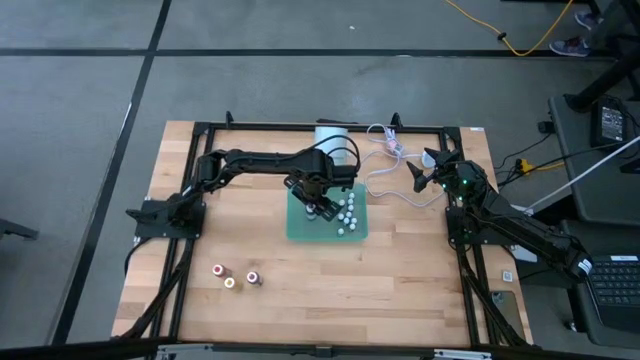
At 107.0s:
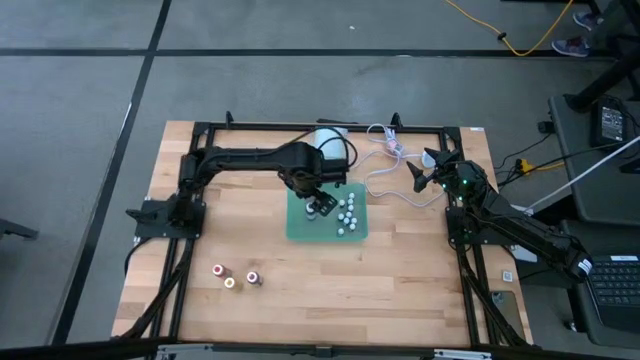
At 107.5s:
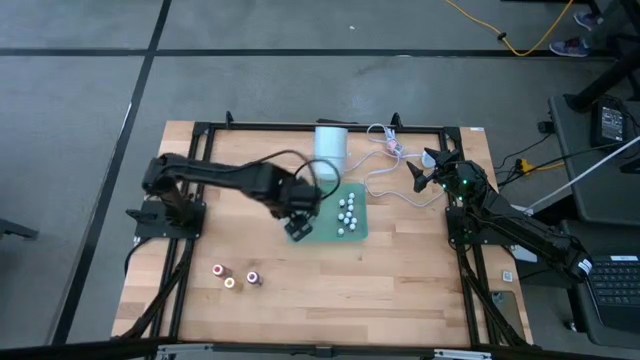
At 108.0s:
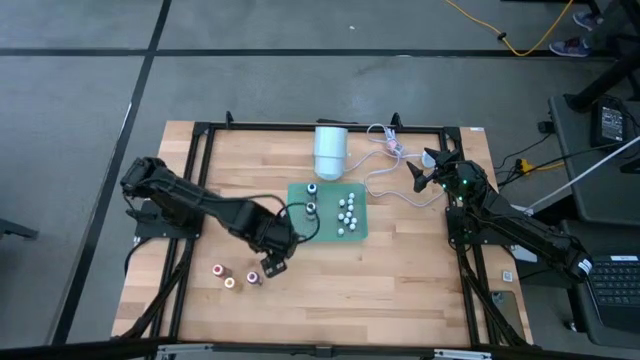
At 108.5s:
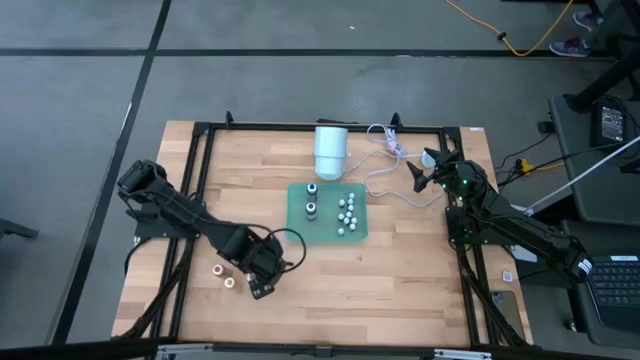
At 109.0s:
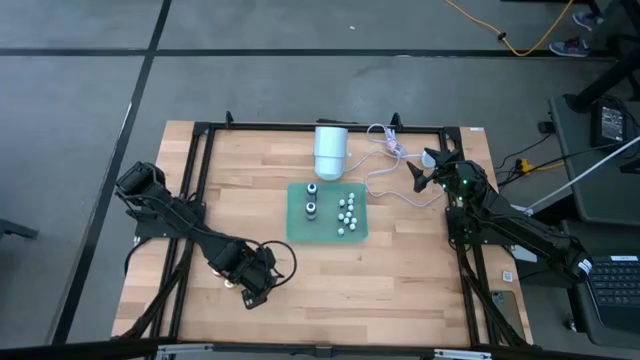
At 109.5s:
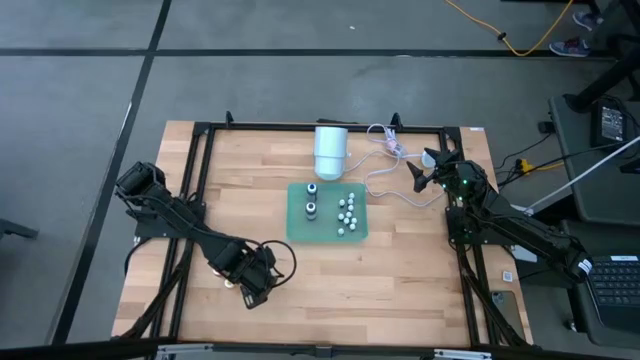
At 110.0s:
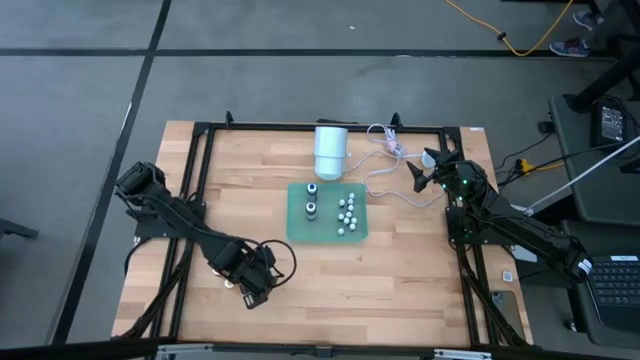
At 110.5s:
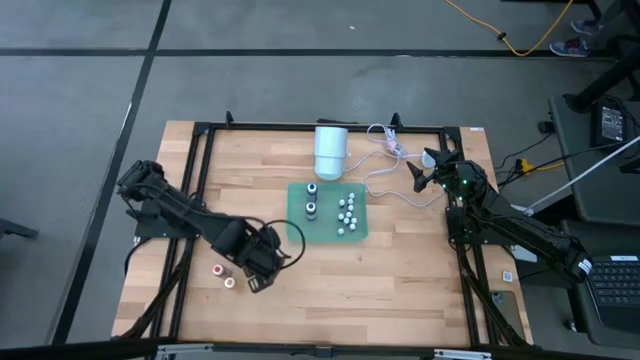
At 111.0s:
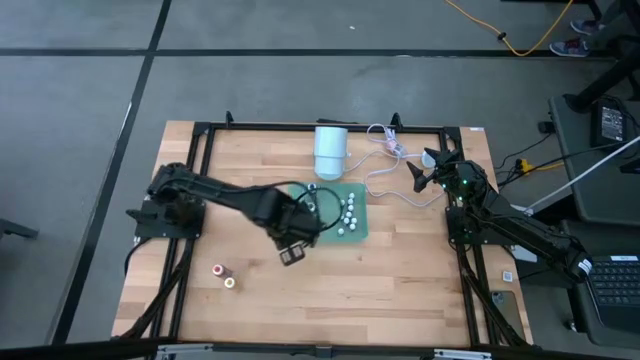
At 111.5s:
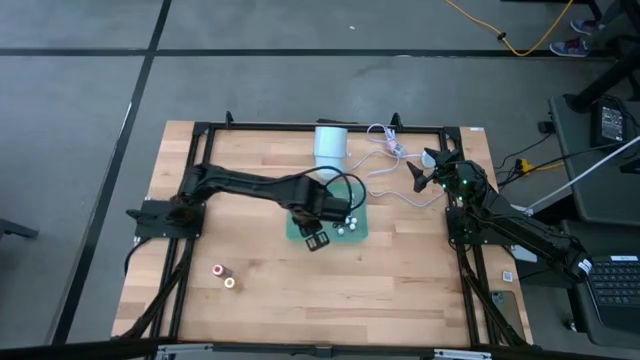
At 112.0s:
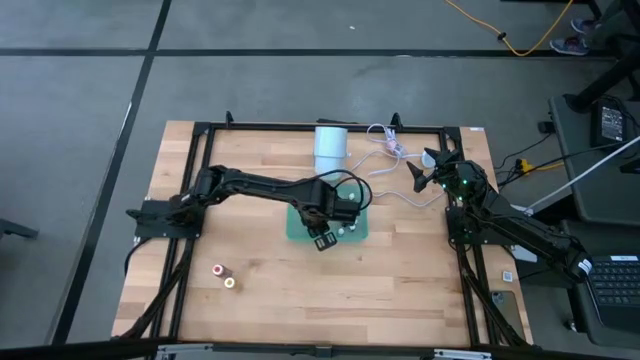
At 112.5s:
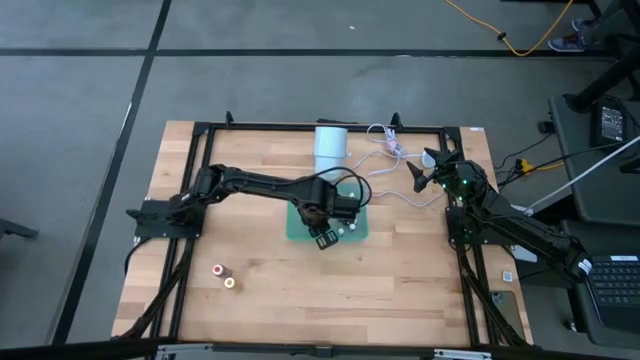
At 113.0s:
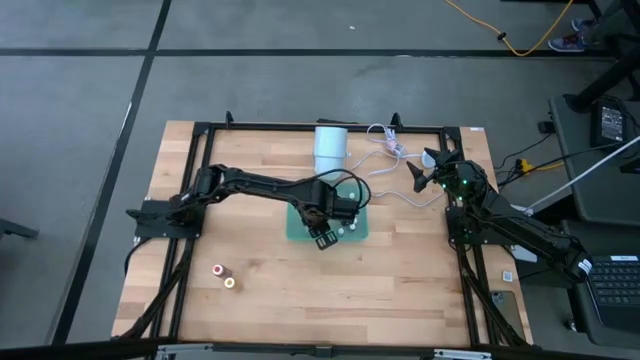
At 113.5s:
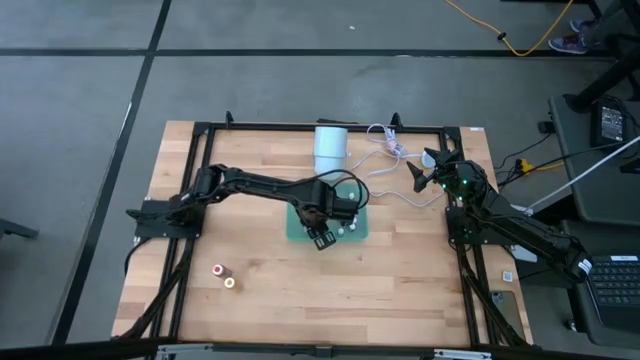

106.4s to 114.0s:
Task: Pick & Place food coloring
Put the large pink food coloring bottle into the green bin

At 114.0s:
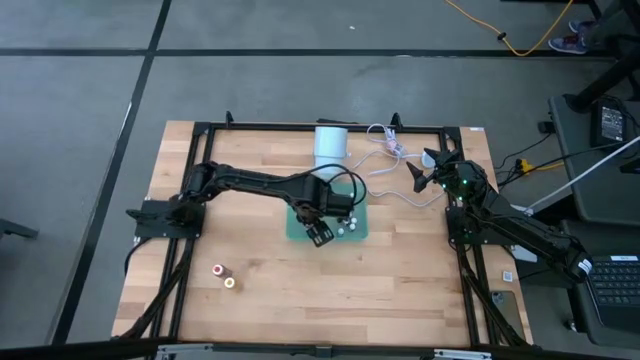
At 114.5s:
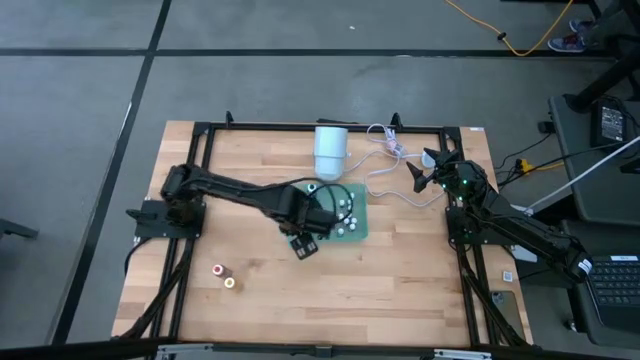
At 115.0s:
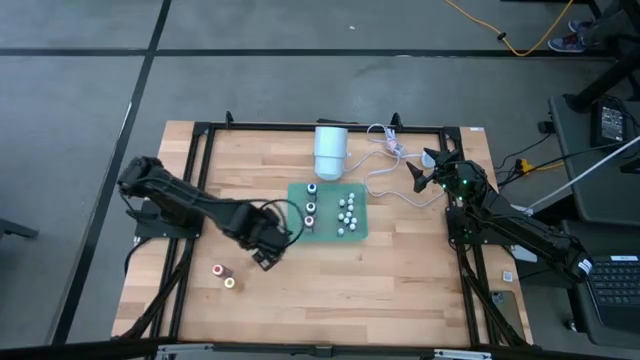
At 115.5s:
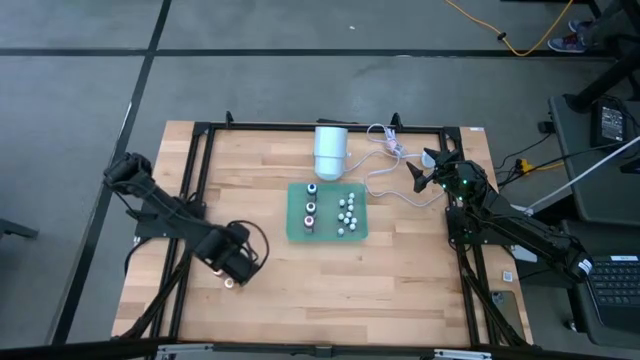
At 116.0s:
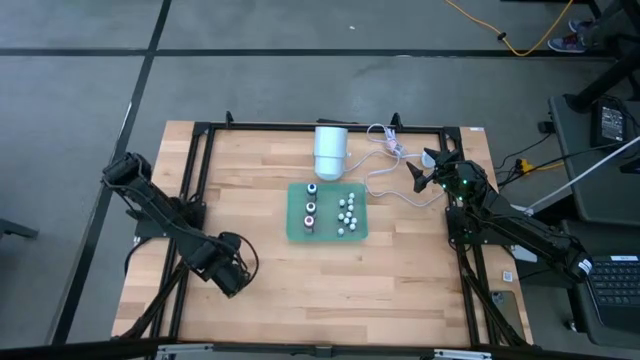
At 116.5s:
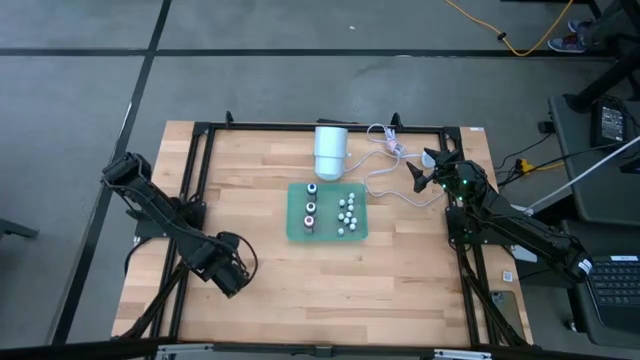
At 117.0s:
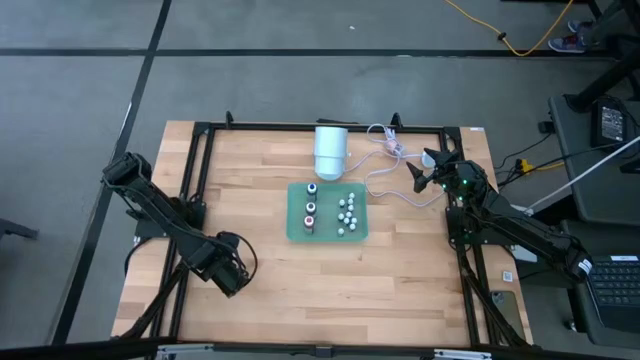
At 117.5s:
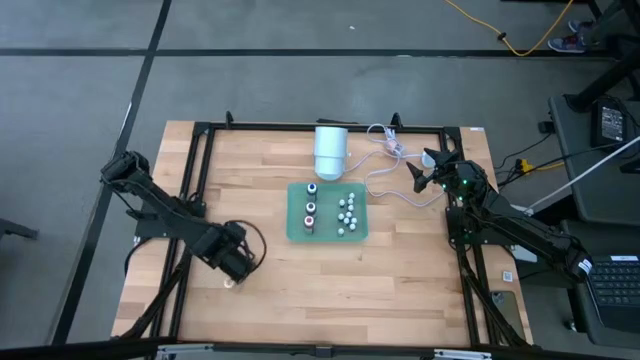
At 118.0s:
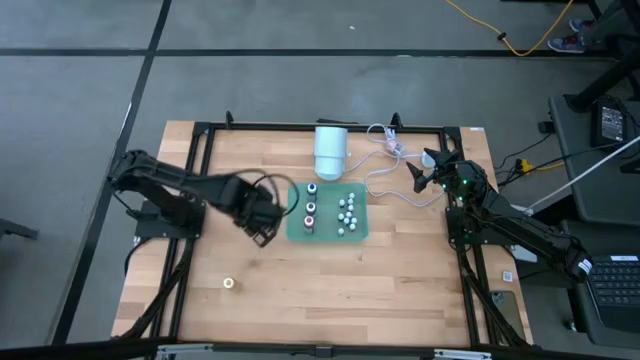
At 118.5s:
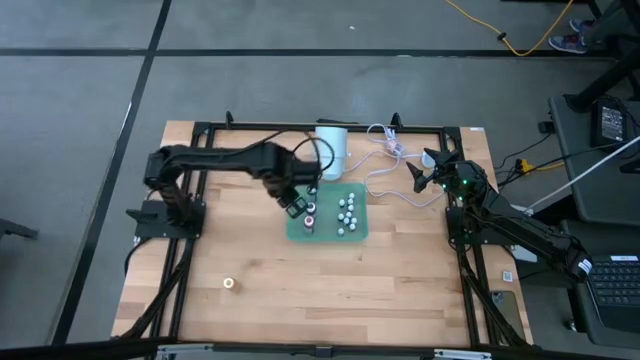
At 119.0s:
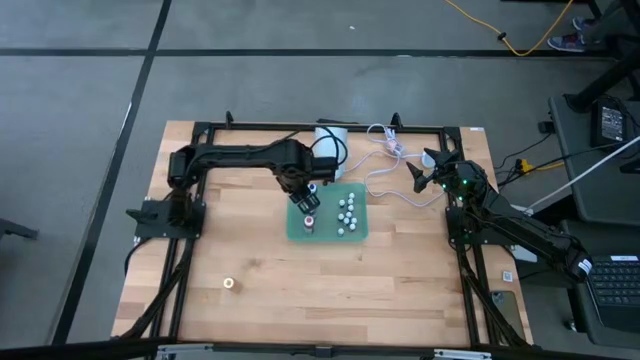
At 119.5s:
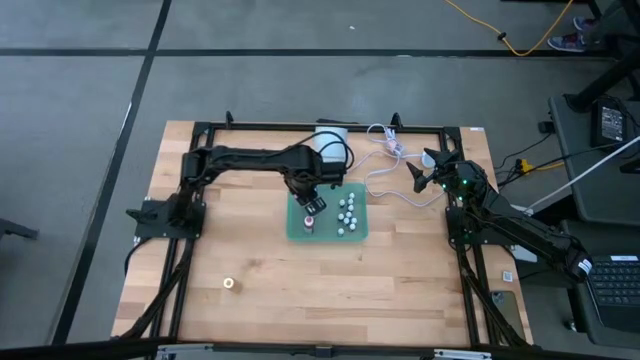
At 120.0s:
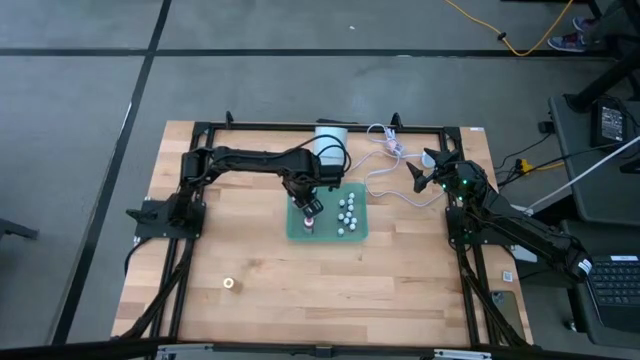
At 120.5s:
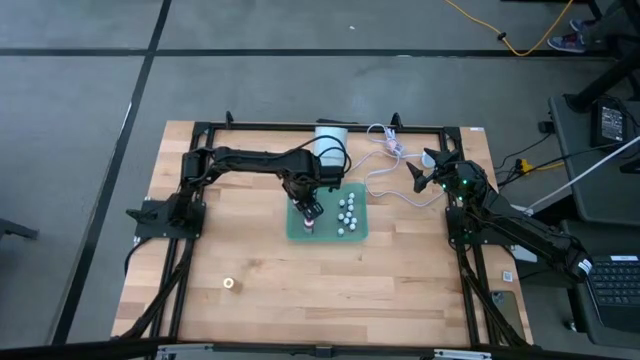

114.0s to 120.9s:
Put the large orange food coloring bottle into the green bin

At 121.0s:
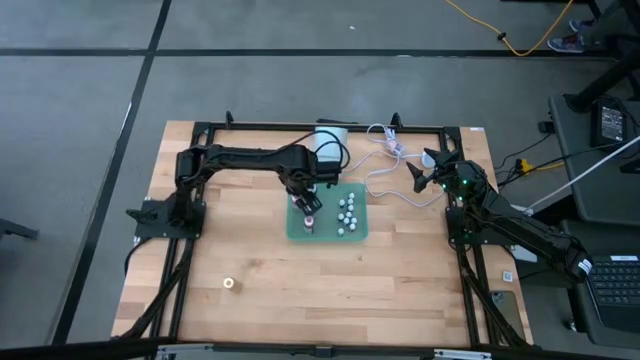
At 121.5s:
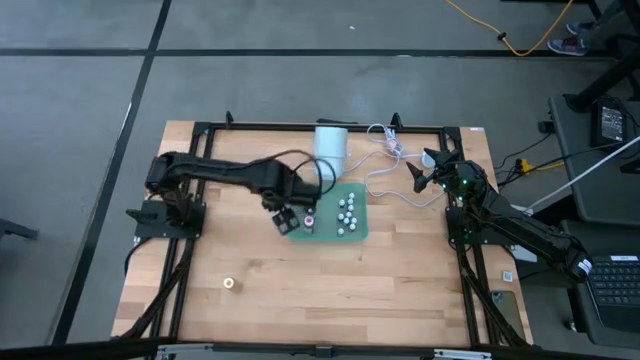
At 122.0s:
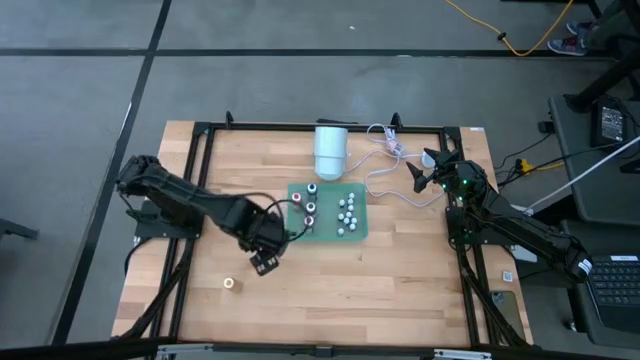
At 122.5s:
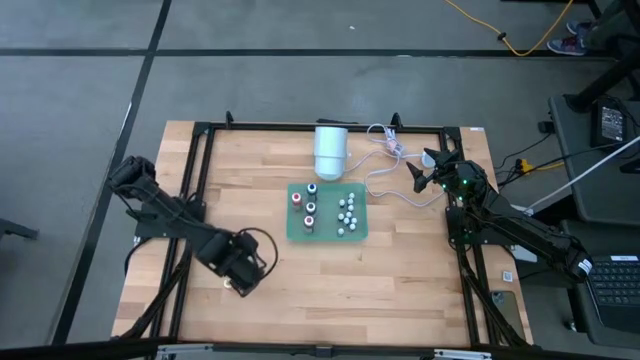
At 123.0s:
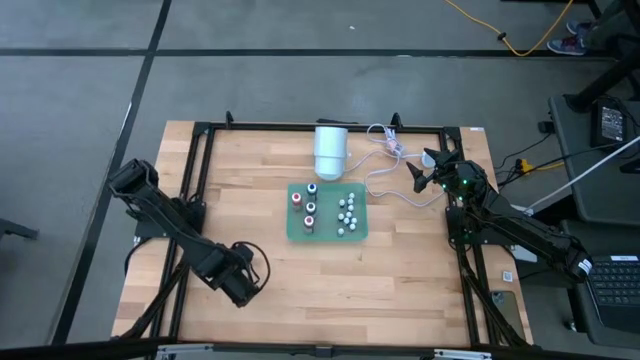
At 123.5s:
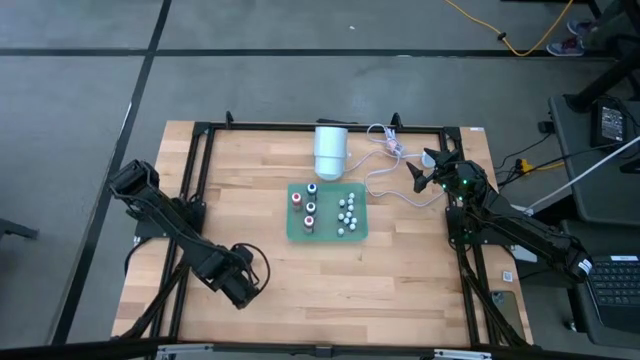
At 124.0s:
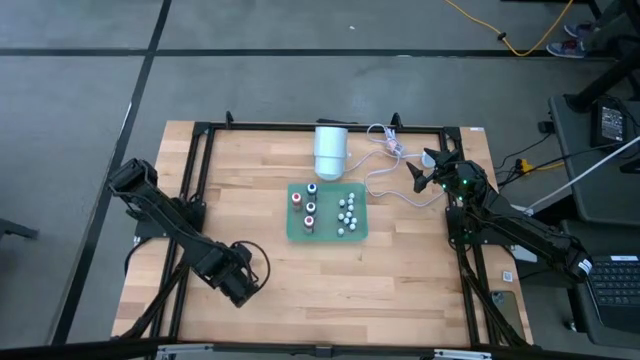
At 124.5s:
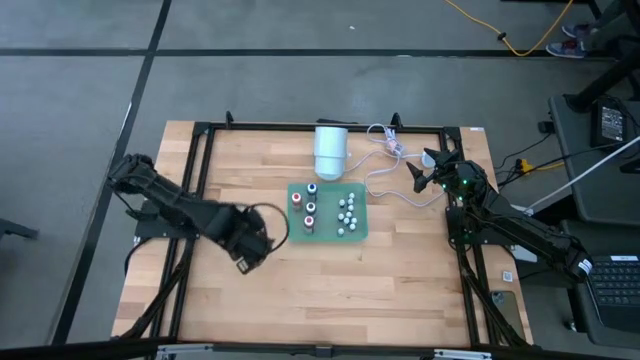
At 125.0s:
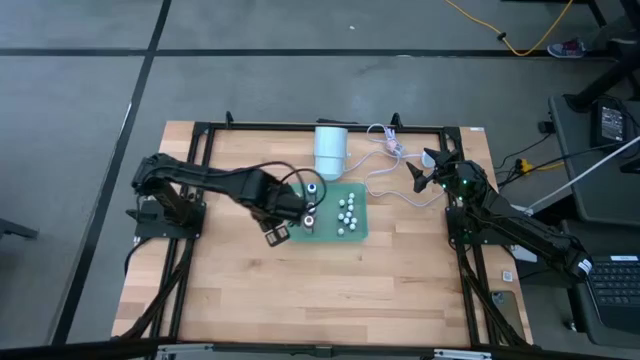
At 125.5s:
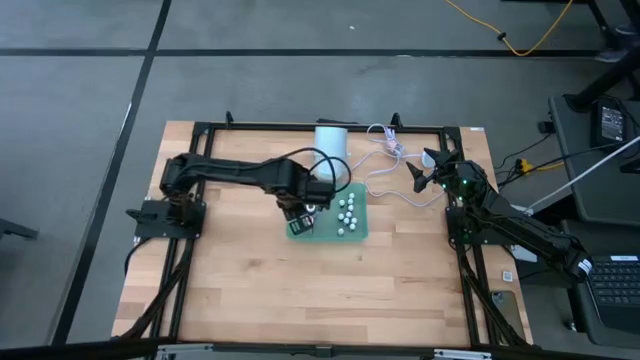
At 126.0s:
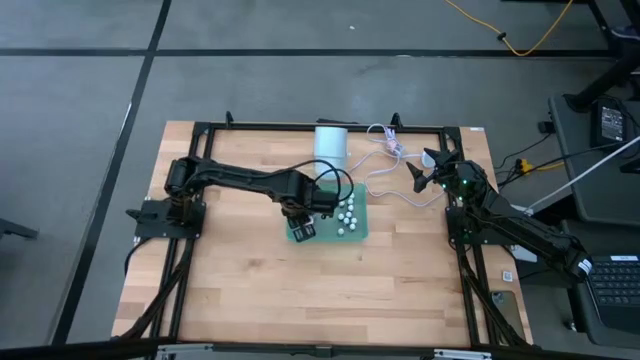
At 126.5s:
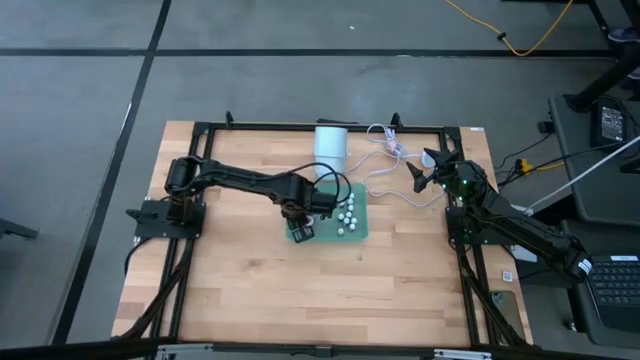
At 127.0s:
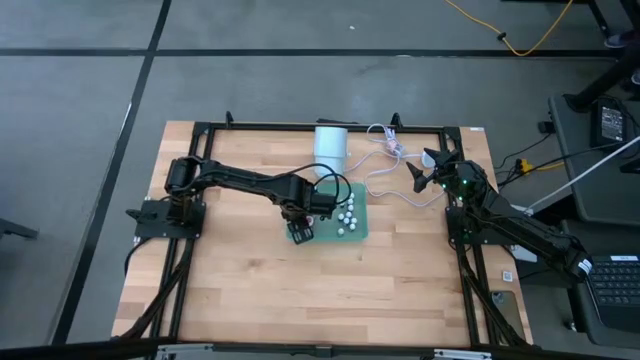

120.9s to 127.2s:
Put the large yellow food coloring bottle into the green bin

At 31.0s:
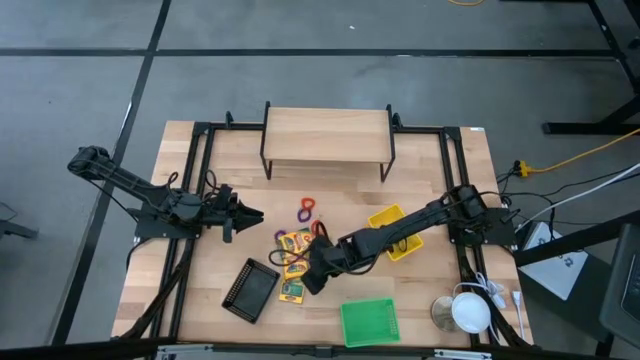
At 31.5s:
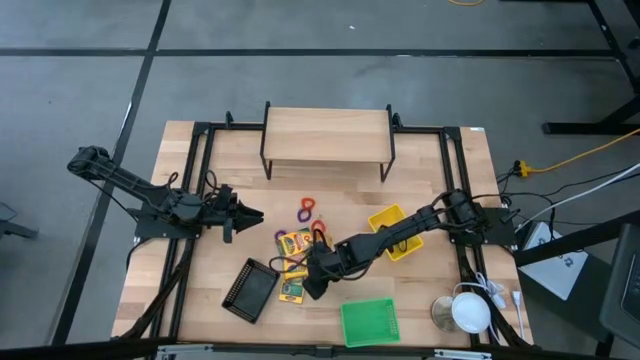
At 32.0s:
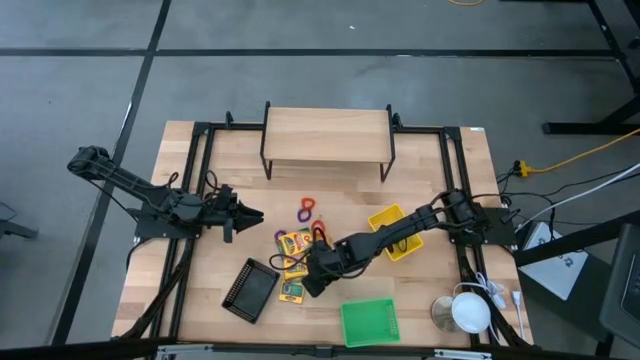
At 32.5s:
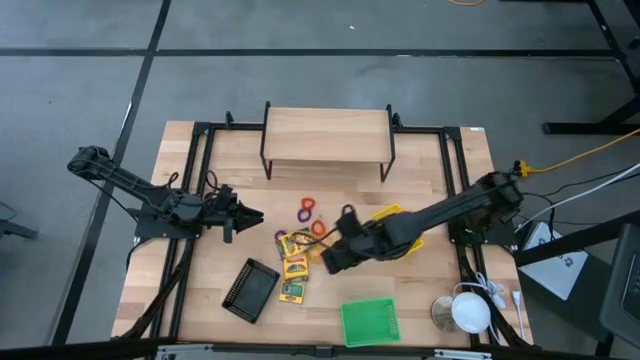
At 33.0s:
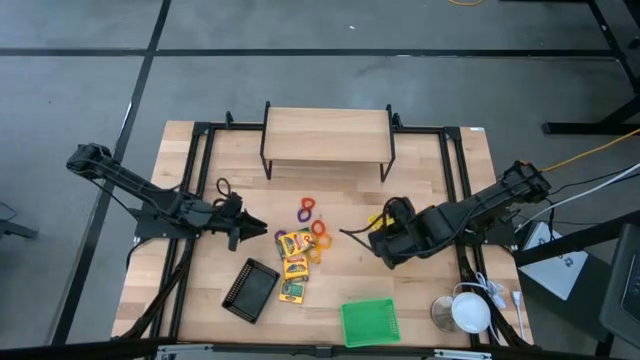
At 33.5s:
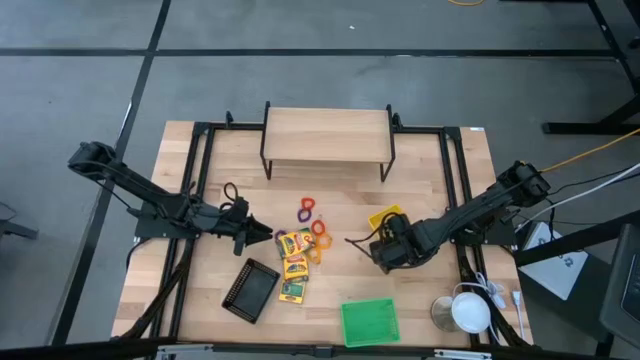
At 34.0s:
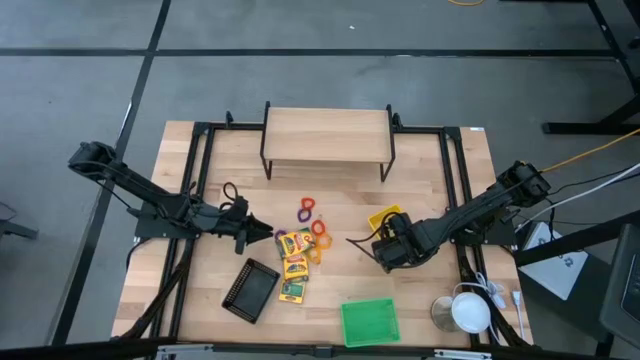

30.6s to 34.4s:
Task: Pick & Place Office Desk Supplies
Put the black rubber band into the yellow basket
